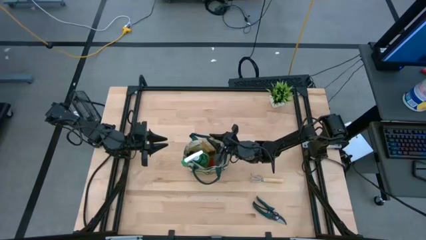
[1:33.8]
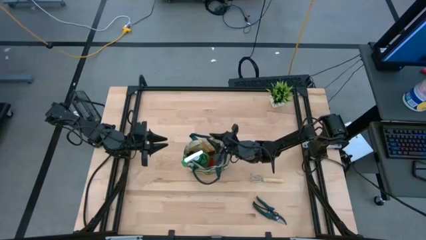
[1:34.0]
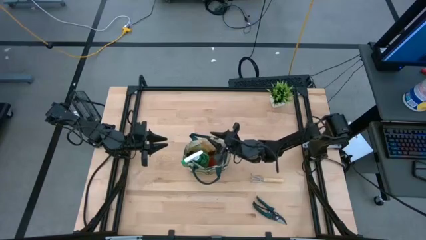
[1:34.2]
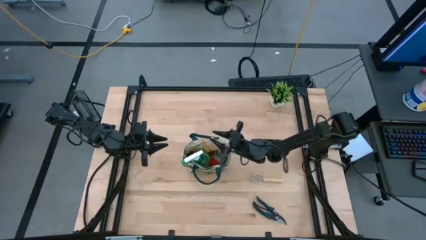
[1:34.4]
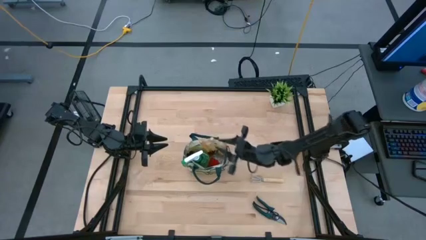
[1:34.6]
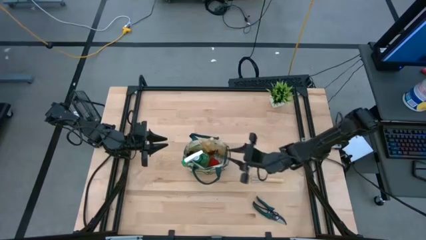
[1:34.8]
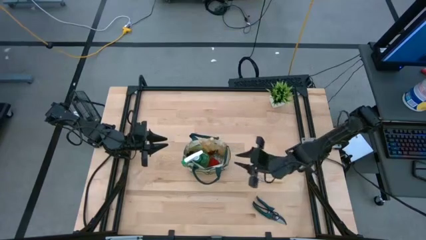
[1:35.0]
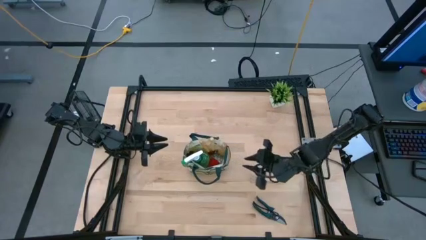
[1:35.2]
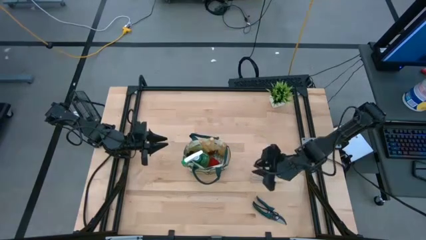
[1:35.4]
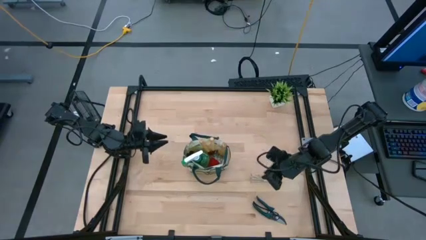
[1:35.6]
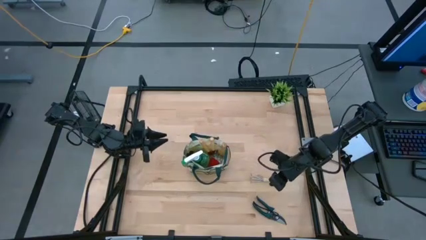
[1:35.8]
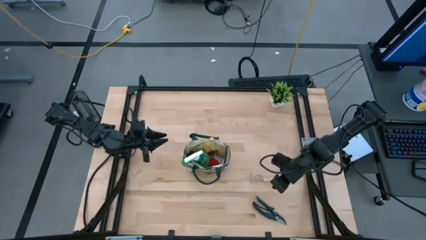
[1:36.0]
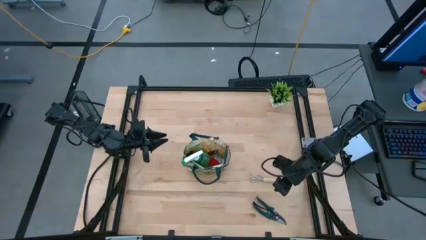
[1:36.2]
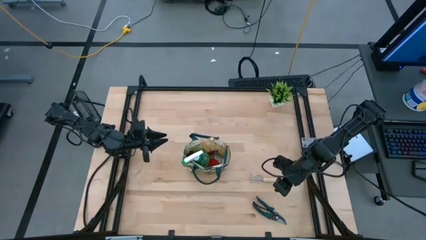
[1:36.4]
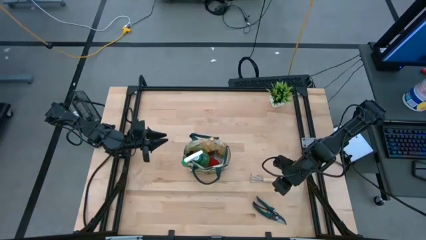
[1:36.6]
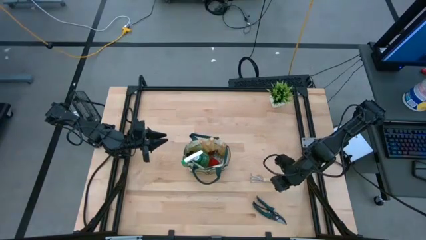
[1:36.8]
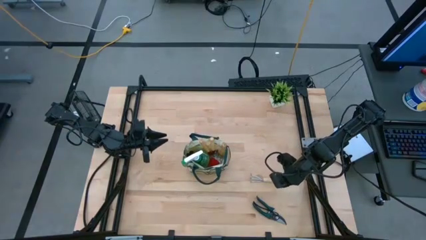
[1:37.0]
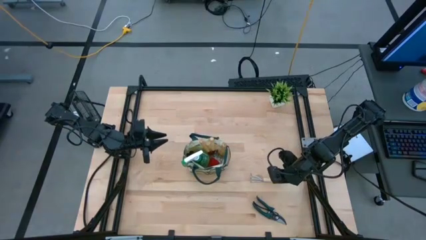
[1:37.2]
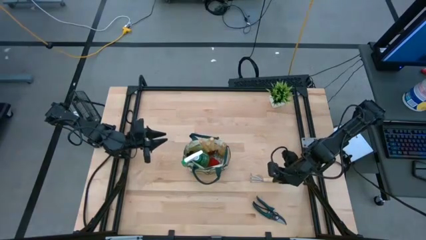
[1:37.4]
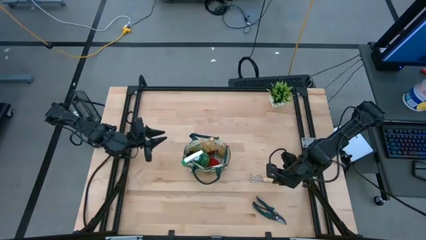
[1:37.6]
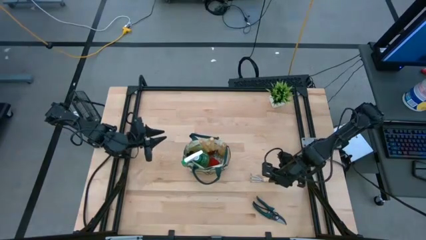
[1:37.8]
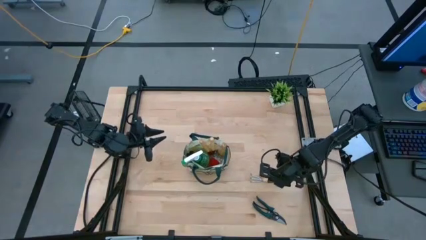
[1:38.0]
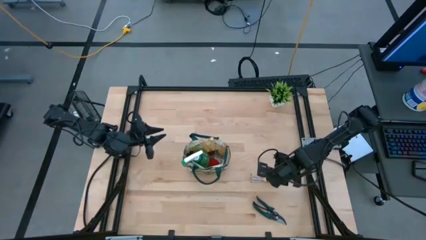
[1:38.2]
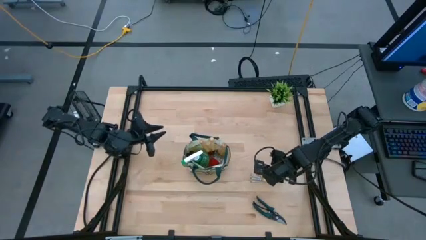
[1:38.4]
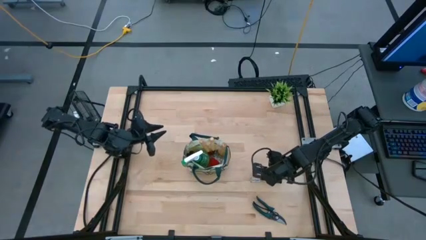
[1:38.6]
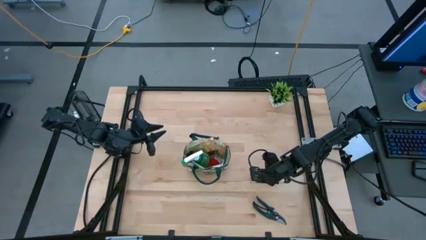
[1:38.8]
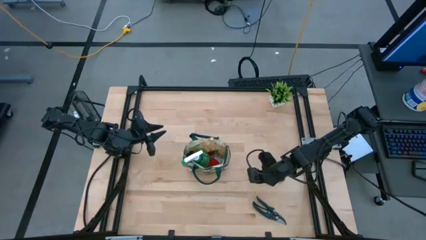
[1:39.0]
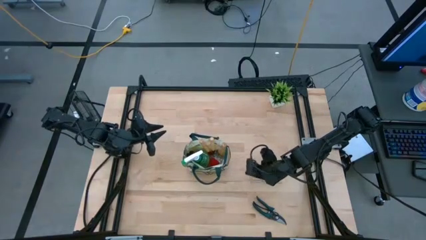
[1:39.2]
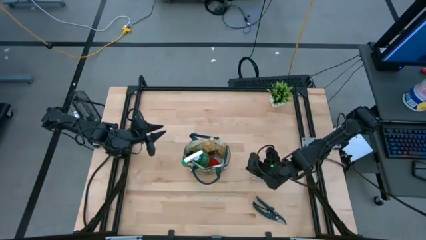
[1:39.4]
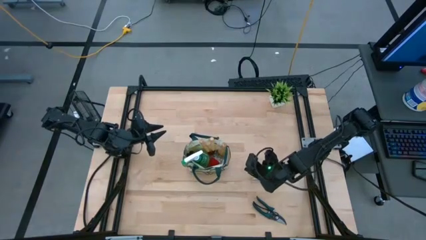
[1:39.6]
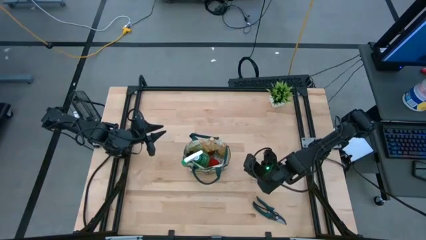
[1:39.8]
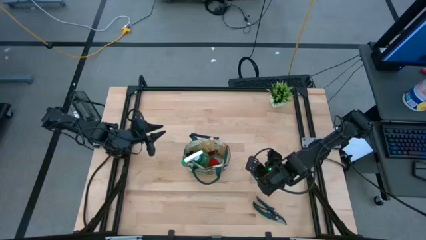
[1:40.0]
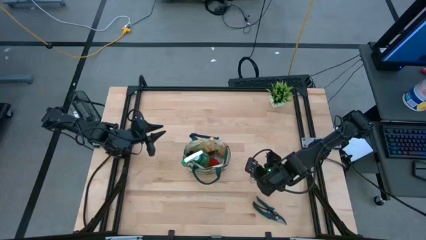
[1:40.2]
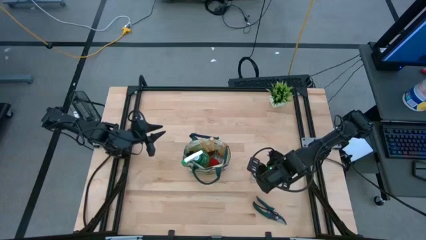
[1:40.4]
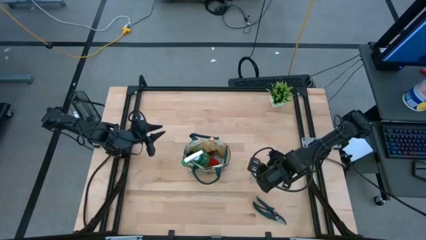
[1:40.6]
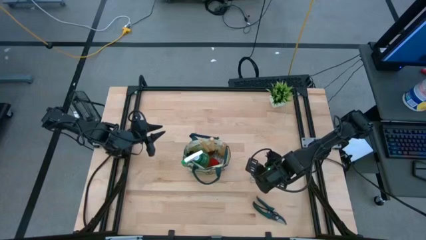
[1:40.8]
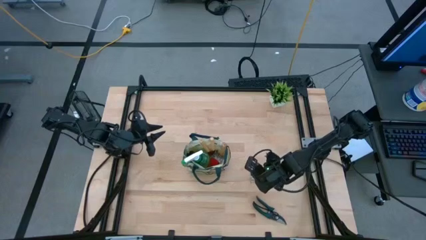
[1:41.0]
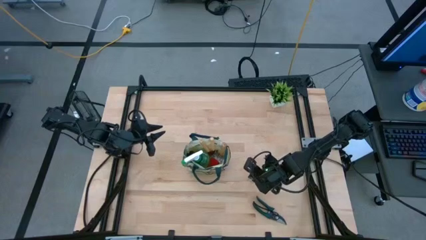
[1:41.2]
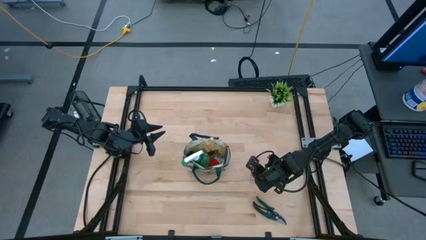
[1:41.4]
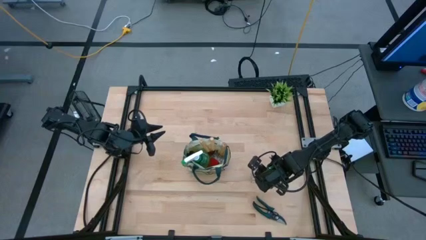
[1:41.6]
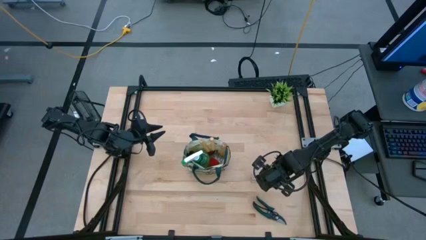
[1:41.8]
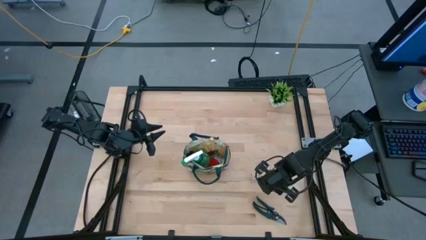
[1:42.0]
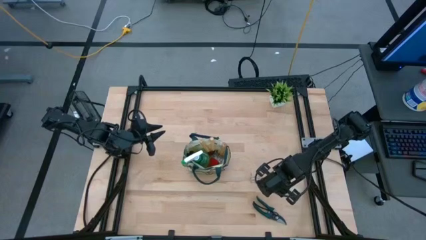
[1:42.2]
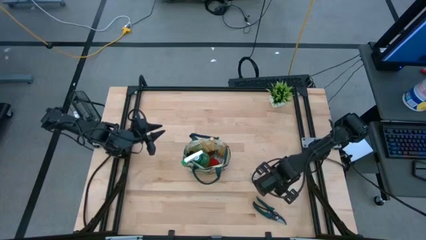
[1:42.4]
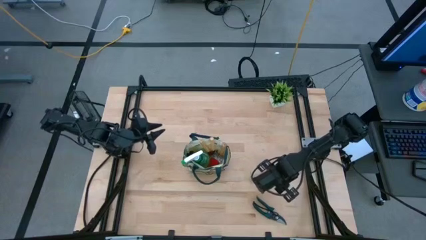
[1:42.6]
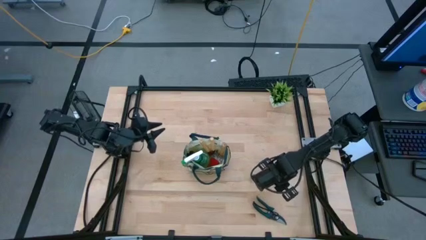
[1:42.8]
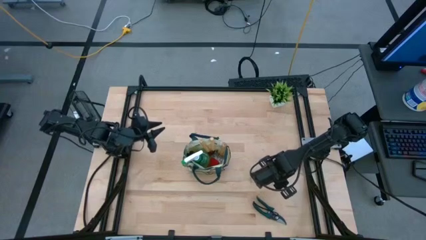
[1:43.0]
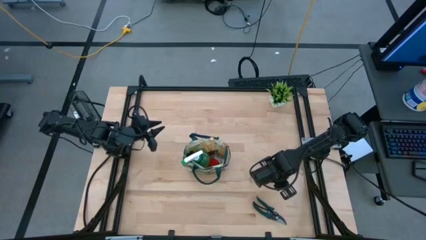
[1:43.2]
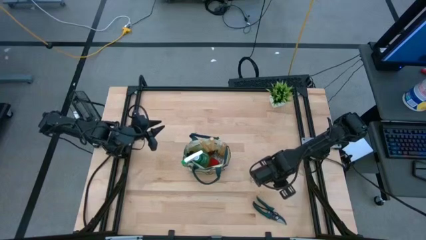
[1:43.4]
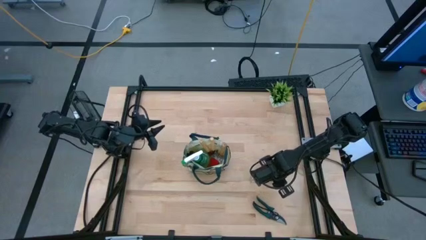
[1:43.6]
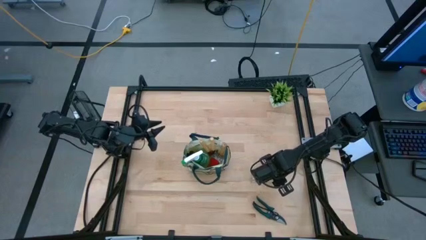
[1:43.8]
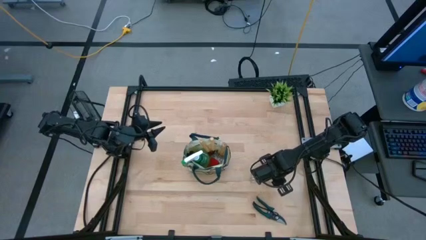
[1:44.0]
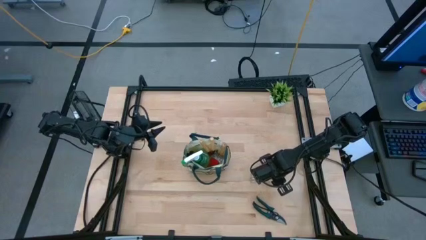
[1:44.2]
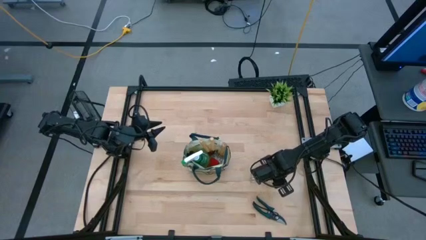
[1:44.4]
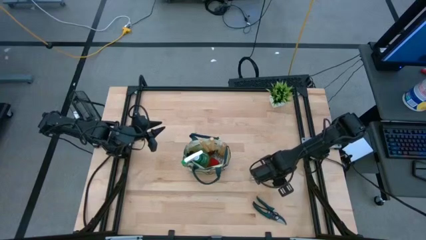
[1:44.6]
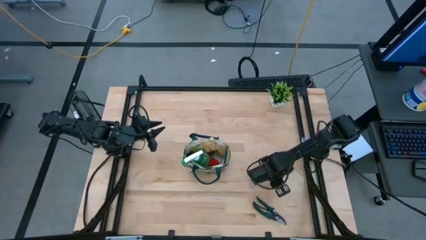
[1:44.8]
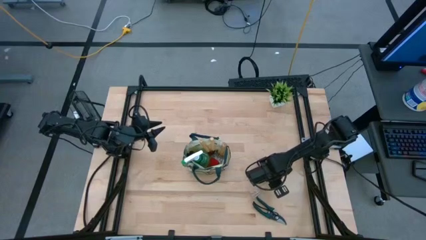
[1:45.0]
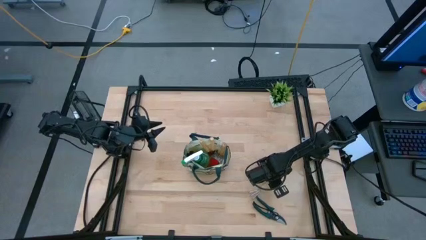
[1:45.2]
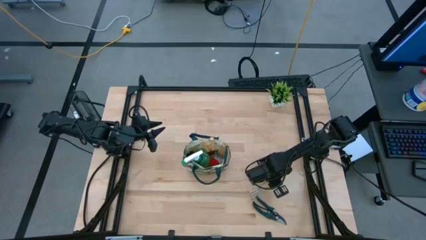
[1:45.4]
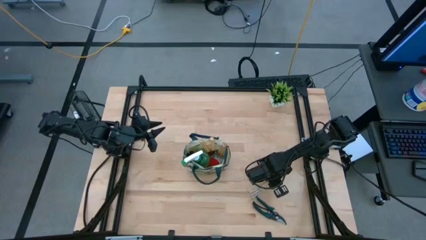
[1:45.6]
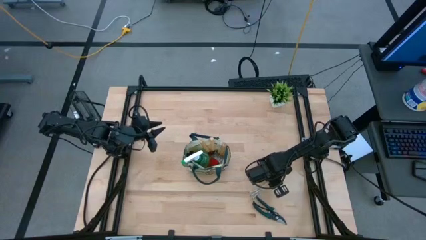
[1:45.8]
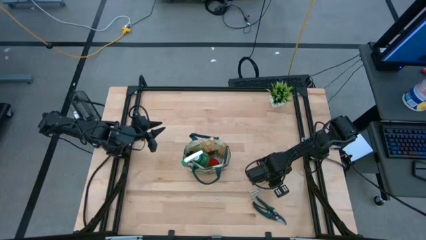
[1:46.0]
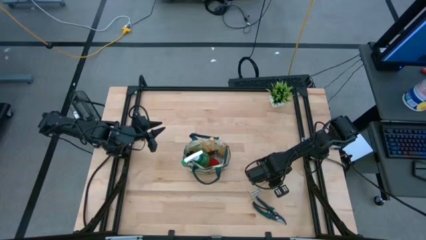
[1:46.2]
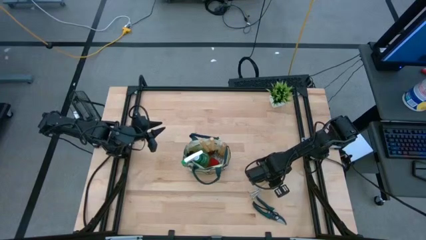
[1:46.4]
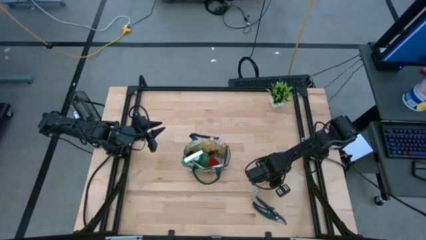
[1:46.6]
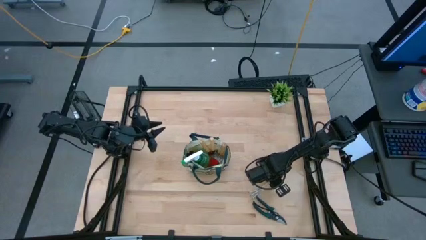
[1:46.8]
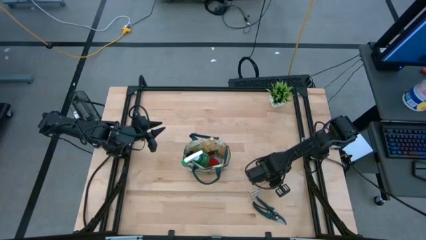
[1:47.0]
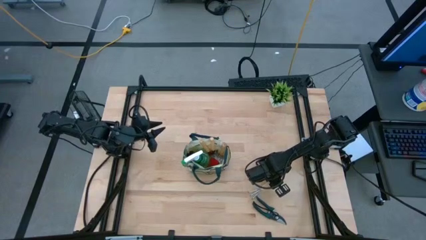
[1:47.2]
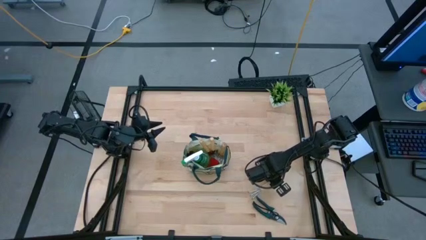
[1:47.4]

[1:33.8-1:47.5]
Task: Pick & Place Garden tools in Gardening bag
Put the brown hand rake into the white gardening bag

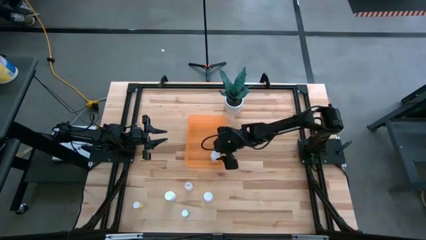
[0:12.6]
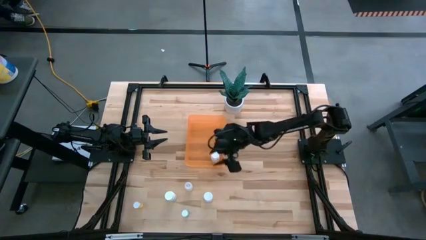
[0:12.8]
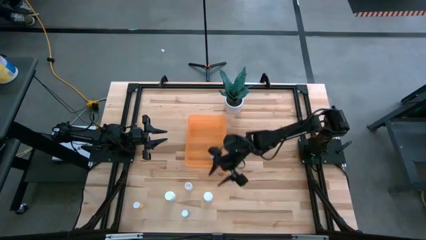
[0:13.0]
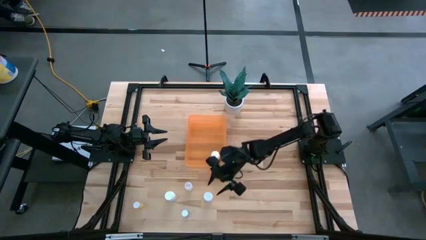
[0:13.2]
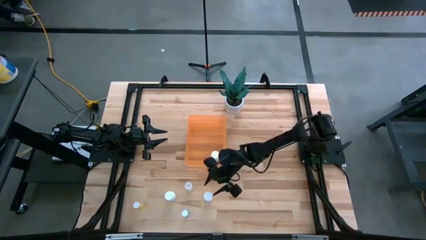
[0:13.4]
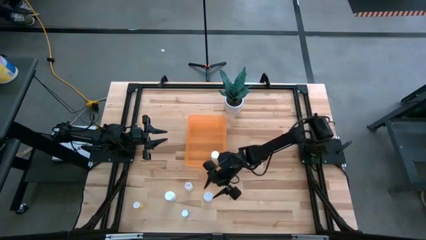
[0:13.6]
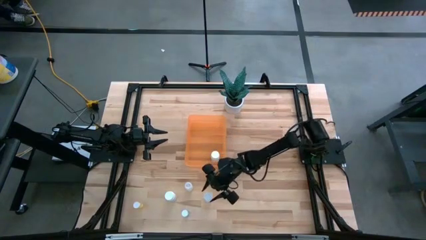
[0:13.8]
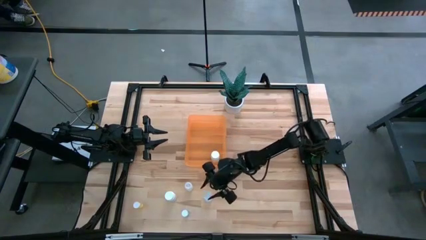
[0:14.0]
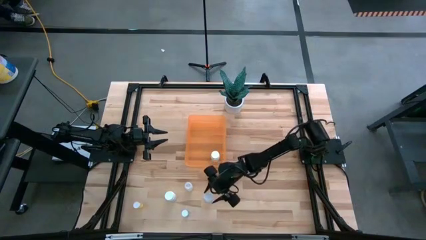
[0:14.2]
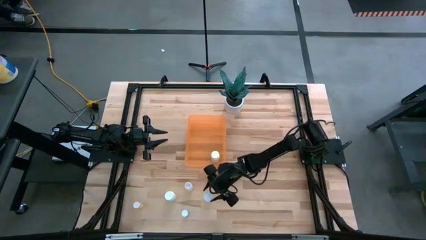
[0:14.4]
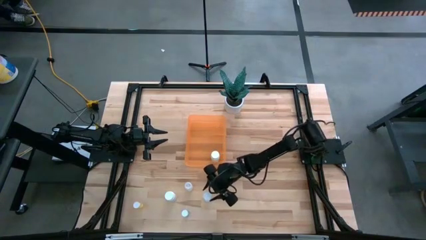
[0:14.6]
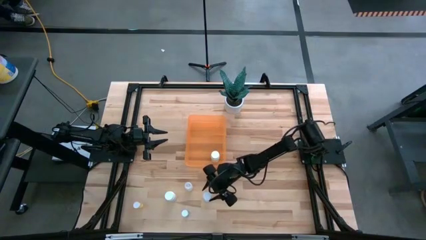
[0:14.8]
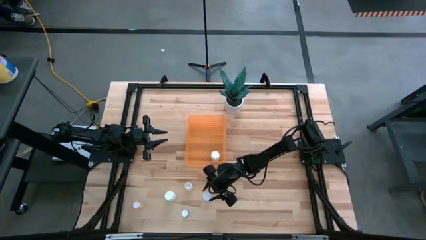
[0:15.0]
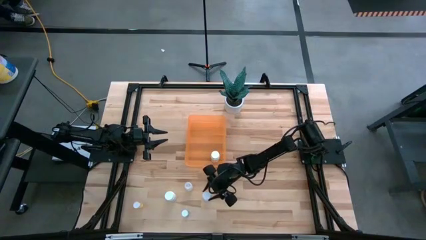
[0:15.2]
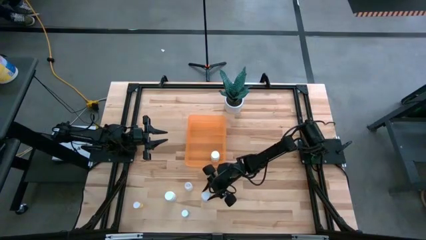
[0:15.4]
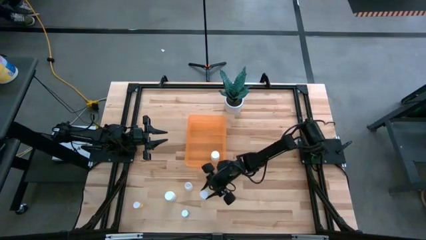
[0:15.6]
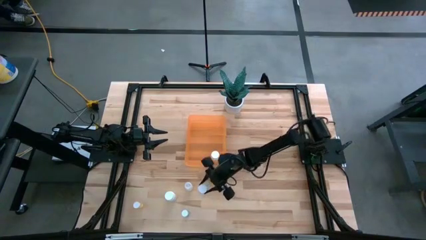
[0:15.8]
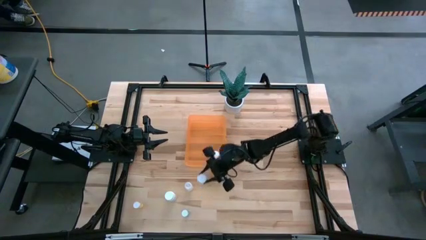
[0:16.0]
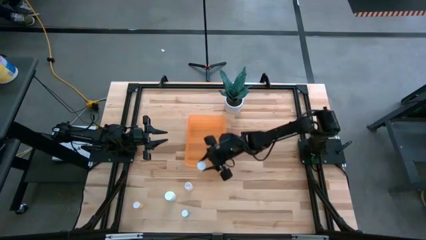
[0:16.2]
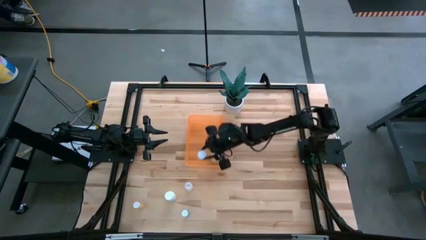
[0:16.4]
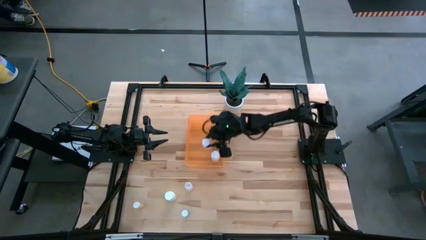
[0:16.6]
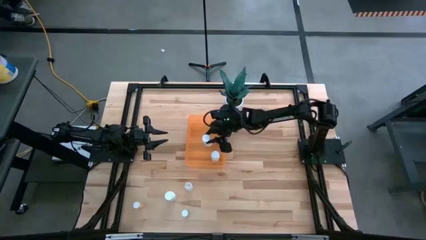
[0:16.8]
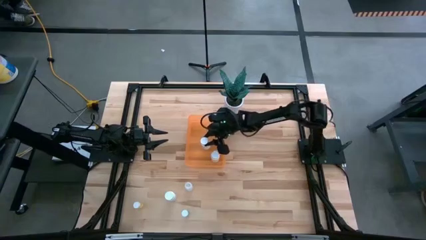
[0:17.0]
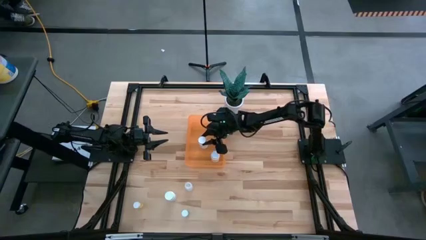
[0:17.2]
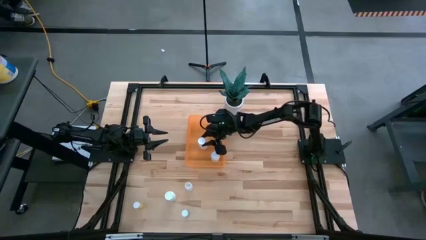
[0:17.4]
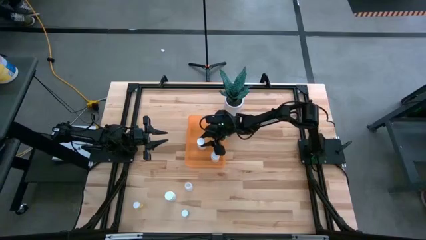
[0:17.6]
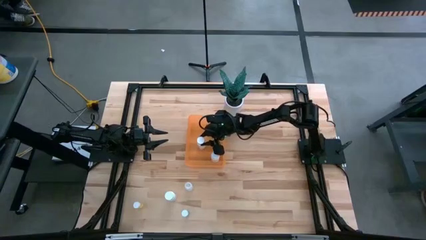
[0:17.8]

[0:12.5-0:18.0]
Task: Pick and place pill bottles into a basket
Put the right white pill bottle into the orange container
